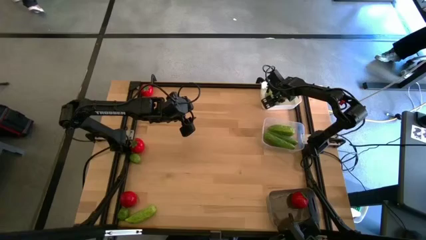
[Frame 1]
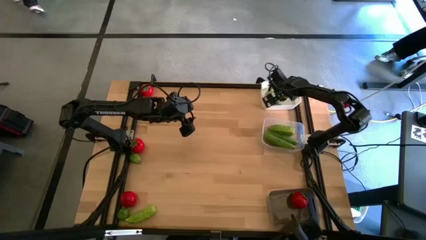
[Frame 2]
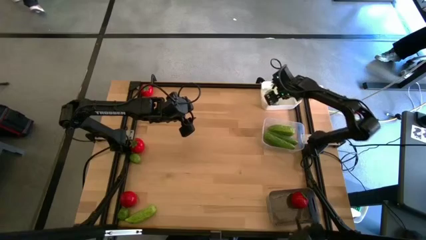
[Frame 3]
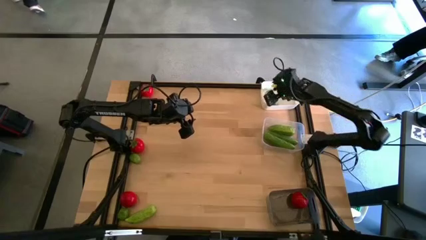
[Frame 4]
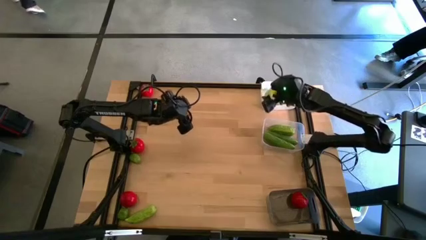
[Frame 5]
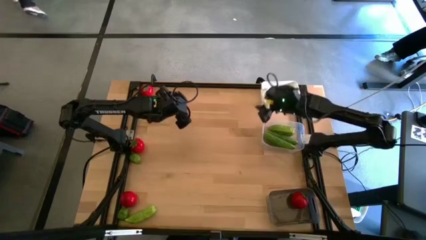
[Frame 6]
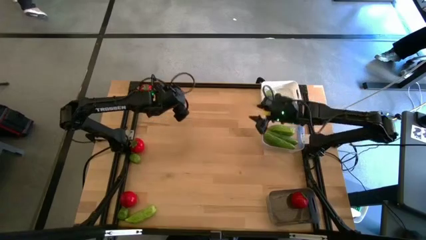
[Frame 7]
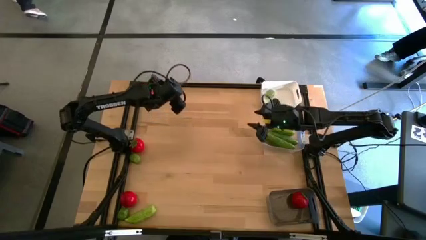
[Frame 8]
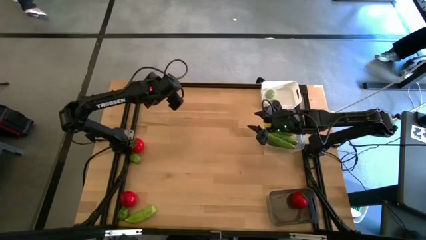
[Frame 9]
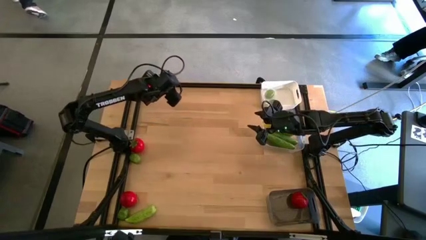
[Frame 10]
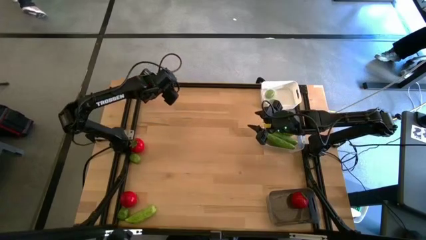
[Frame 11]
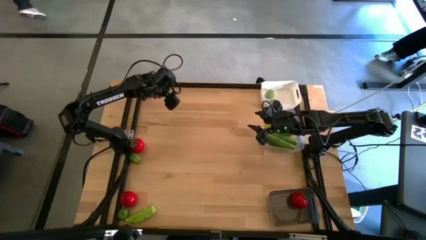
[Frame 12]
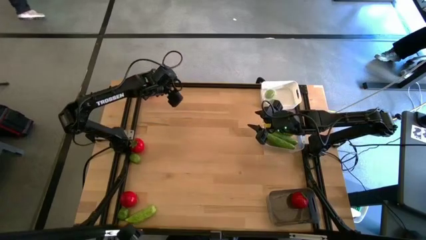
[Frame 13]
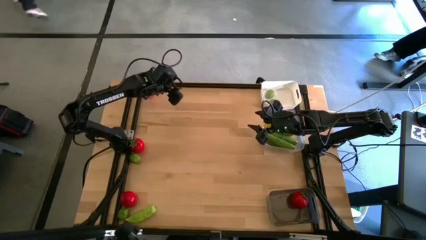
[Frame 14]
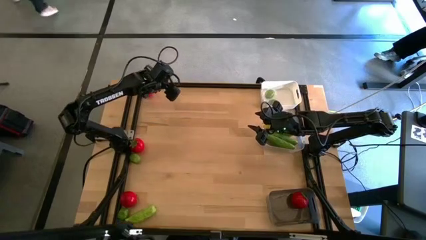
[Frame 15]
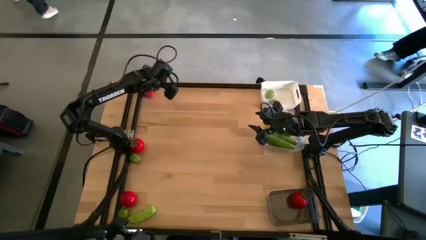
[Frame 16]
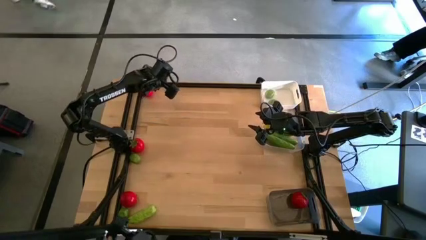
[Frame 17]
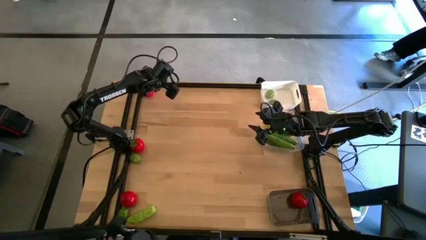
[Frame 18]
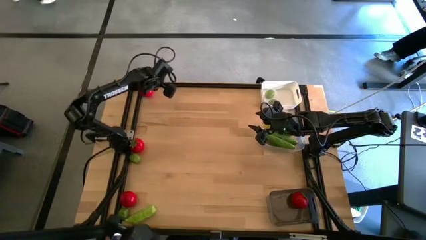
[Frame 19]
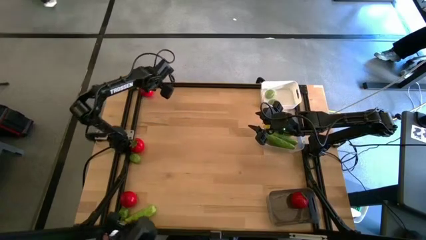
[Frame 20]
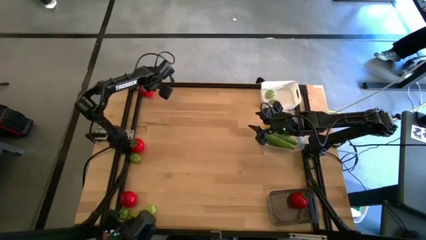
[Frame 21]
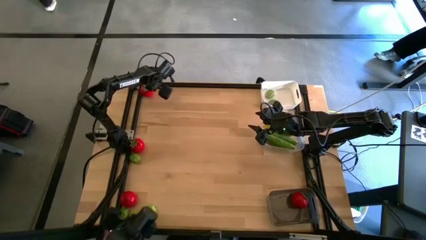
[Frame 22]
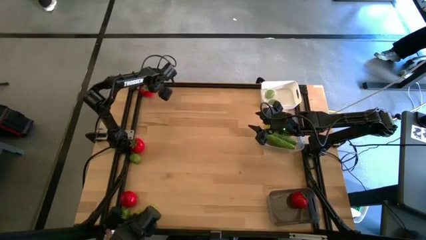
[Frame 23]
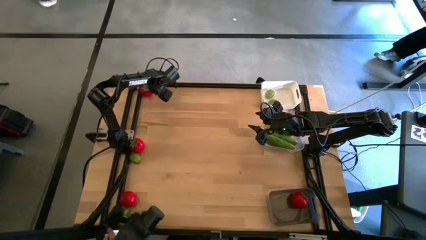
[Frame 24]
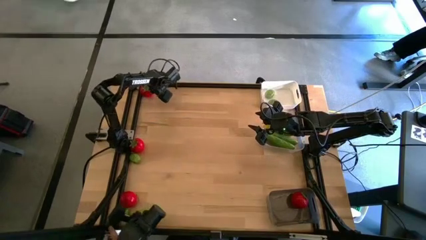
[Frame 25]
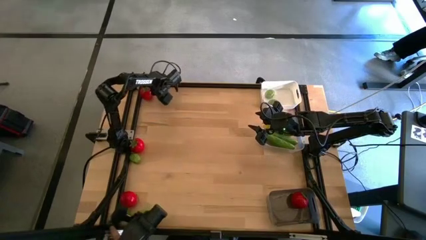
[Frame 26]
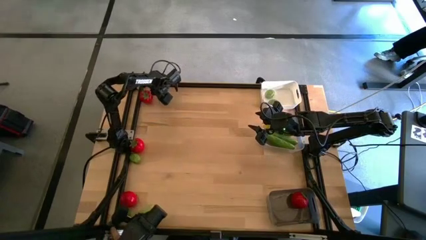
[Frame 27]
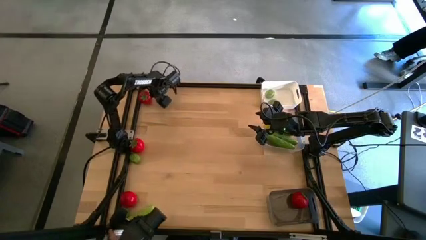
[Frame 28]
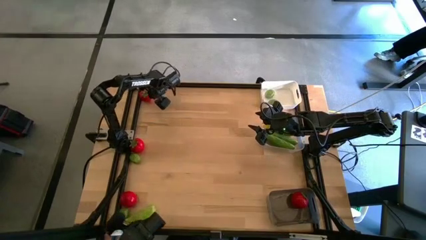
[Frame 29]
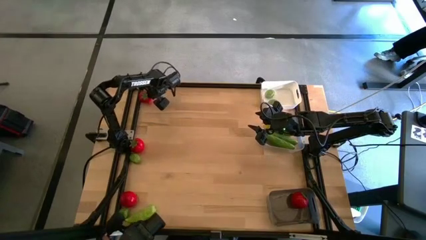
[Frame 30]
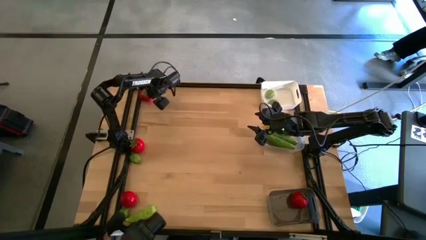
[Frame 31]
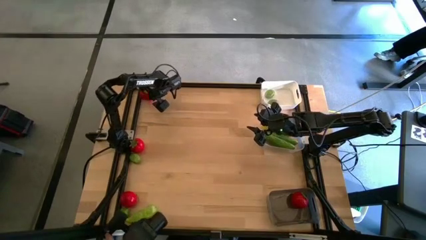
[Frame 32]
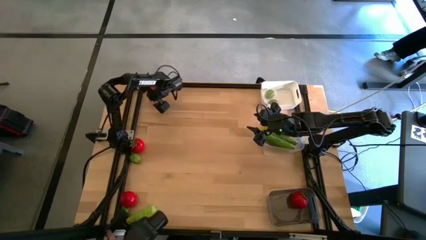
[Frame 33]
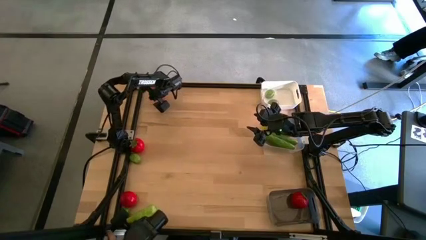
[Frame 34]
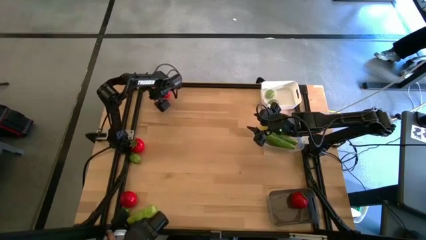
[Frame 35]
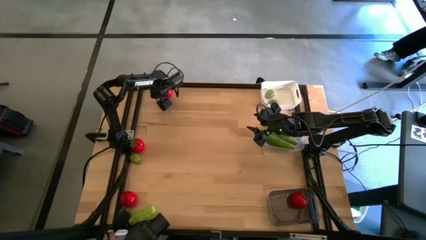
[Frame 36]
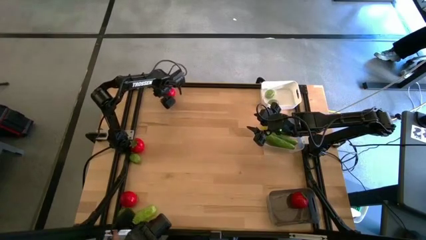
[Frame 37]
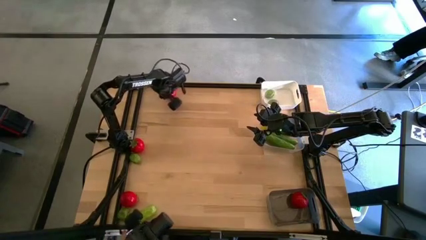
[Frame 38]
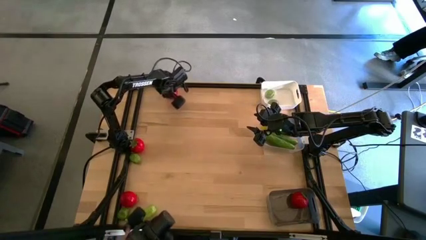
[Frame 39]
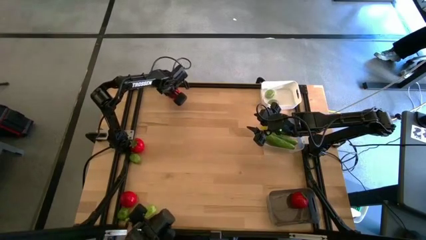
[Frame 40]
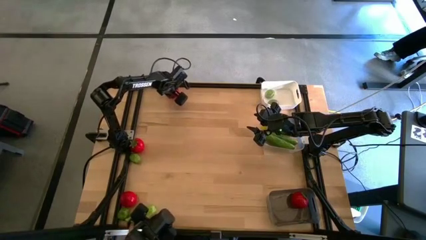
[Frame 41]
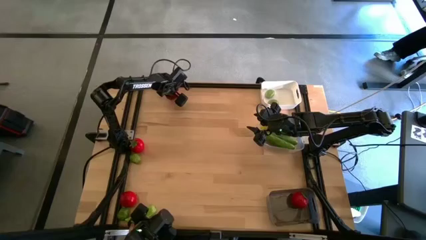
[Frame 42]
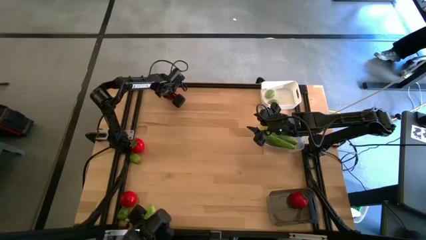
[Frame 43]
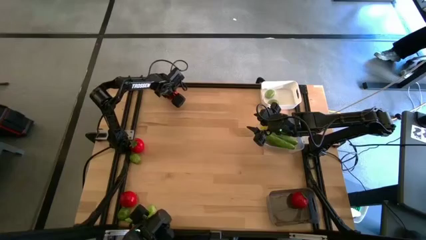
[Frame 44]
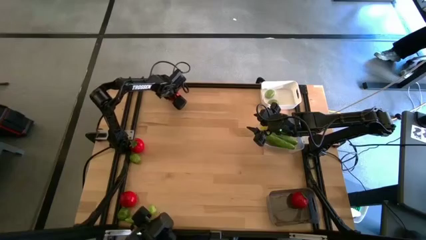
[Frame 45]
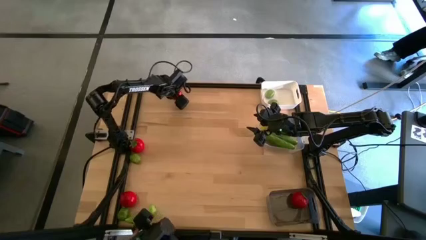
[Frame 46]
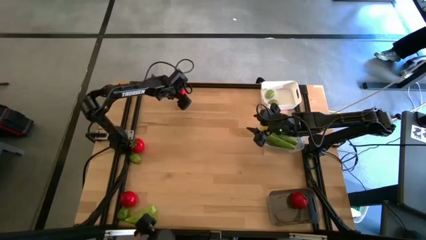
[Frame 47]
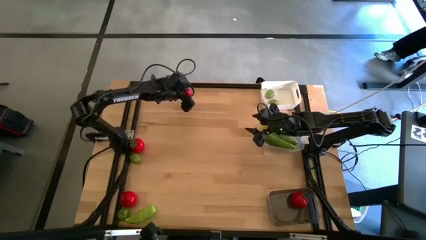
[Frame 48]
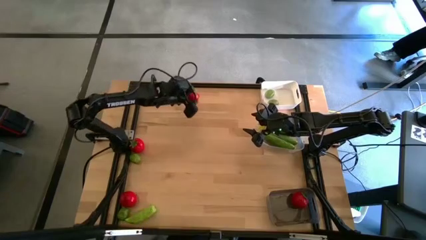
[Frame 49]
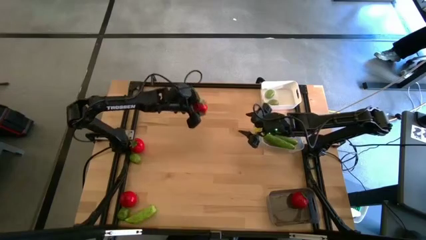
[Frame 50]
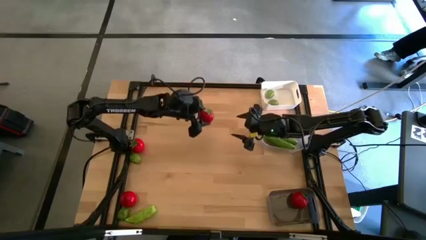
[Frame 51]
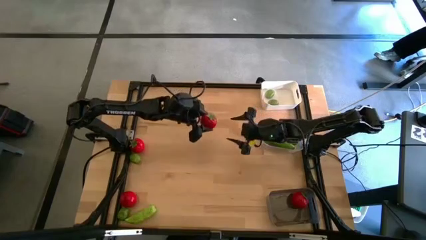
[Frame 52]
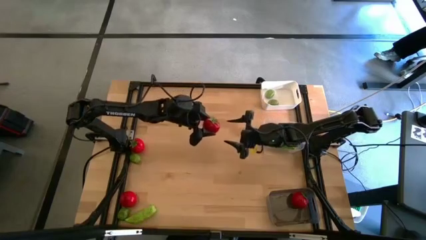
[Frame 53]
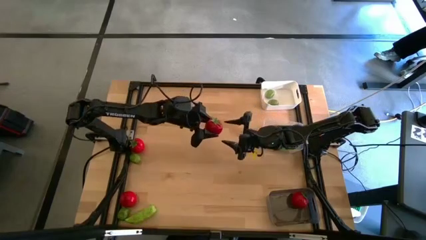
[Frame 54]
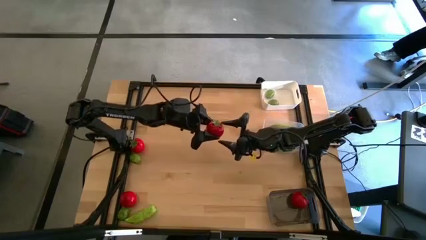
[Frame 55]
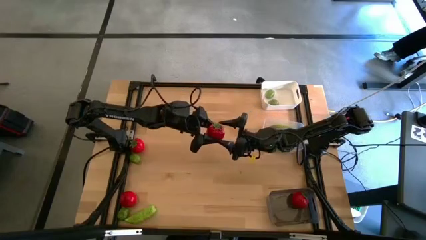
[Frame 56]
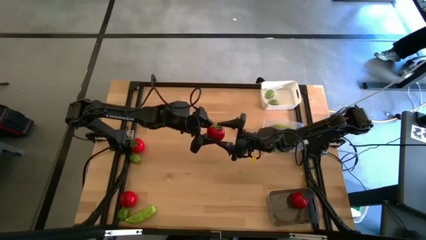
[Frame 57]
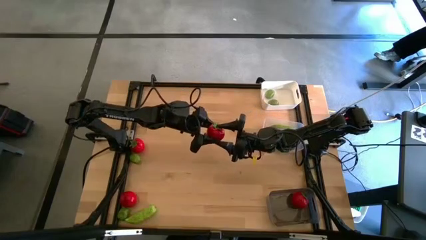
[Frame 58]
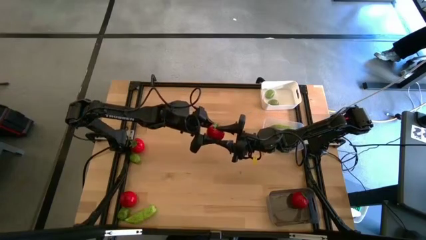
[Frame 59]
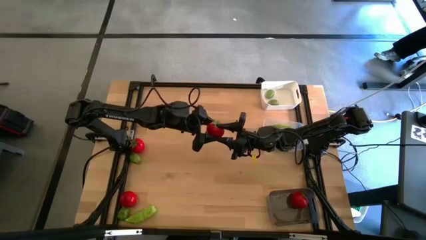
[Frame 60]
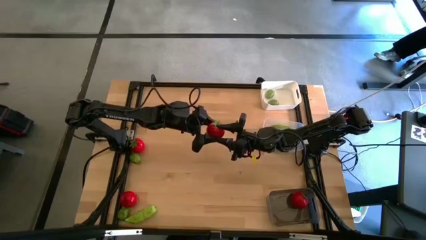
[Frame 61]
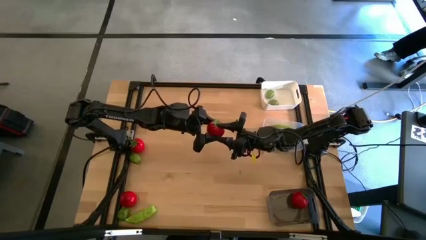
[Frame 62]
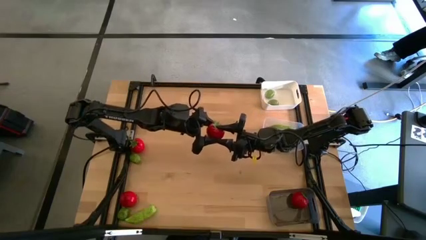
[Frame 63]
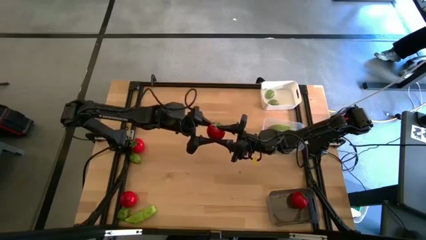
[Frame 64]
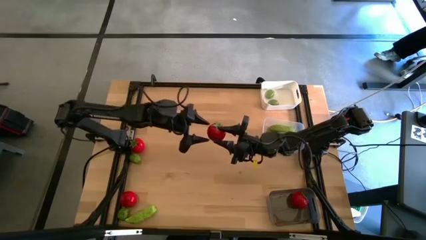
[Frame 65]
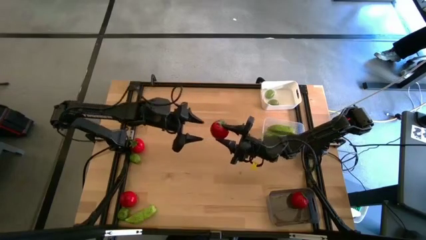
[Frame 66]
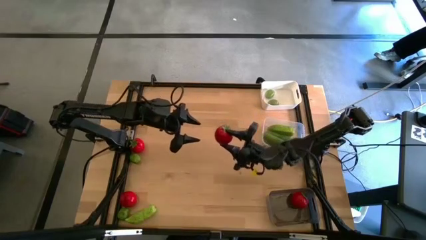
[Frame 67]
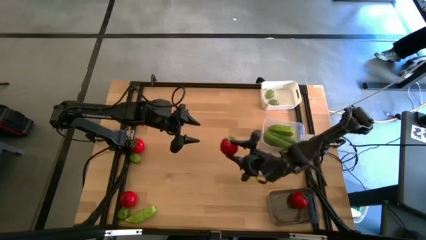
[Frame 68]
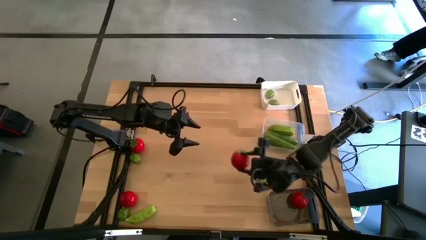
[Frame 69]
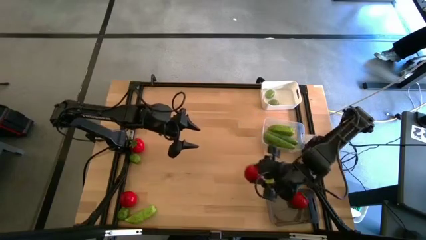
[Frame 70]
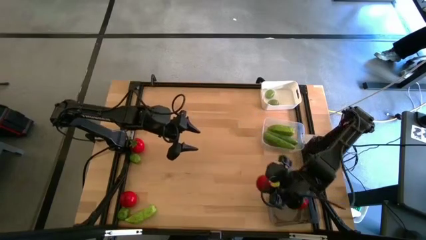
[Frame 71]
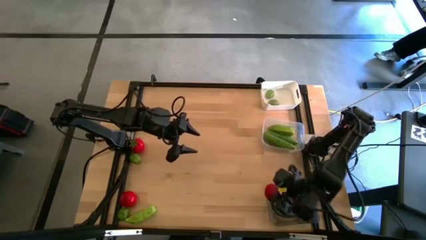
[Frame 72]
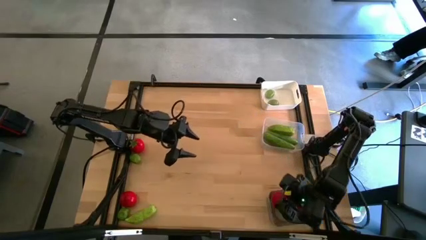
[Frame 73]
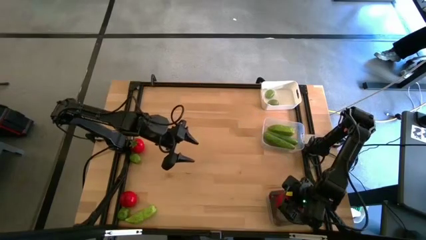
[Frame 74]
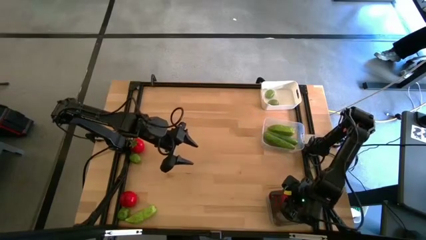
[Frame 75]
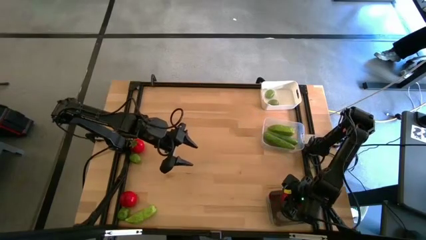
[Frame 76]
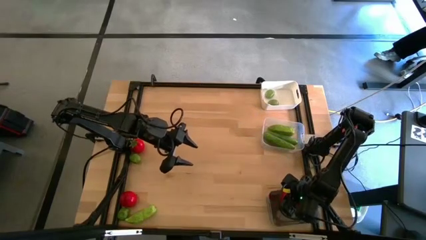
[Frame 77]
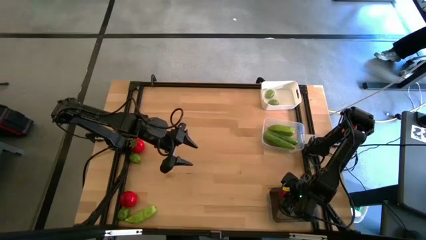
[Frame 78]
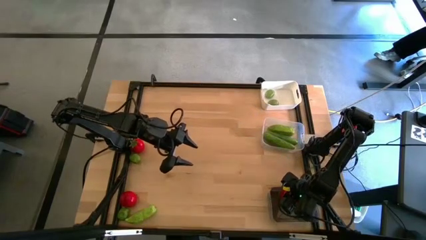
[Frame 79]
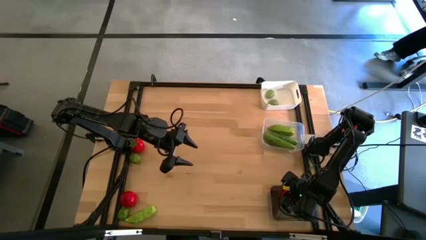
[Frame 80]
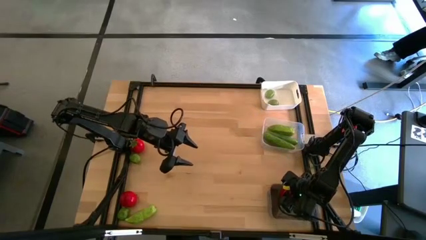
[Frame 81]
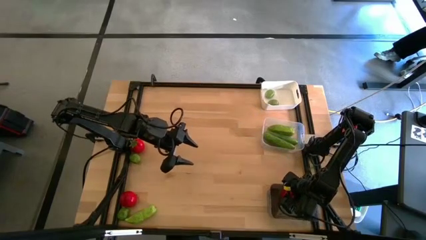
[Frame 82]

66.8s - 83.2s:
Task: Sort produce into baskets
Put the top tomato into the black bin
